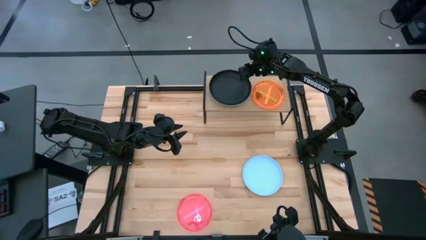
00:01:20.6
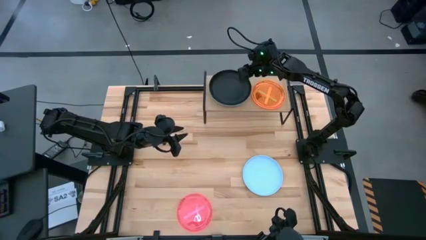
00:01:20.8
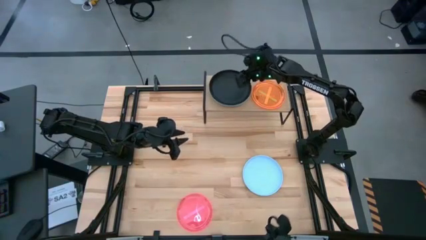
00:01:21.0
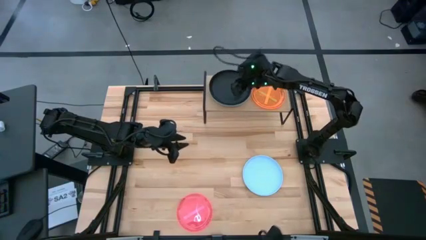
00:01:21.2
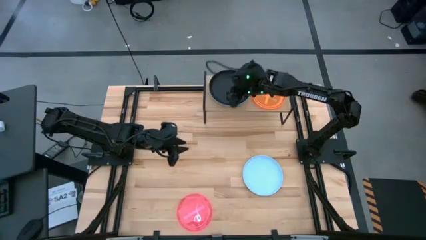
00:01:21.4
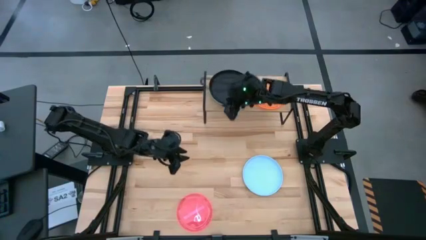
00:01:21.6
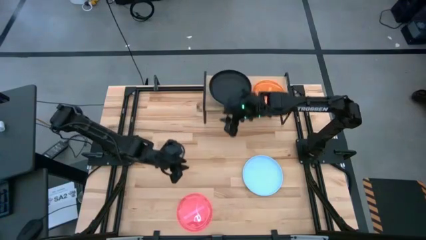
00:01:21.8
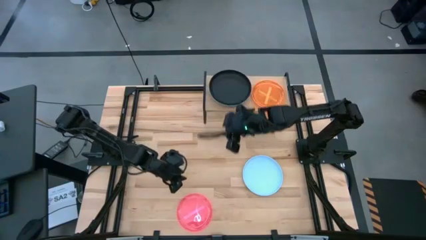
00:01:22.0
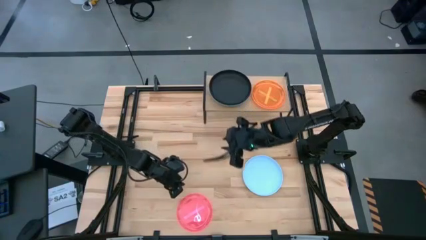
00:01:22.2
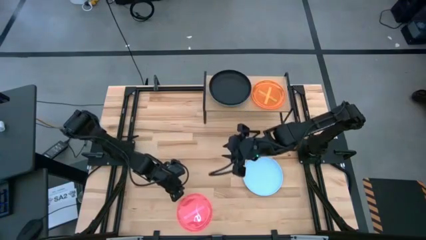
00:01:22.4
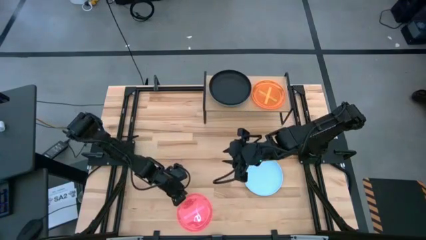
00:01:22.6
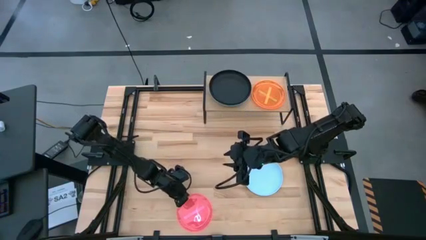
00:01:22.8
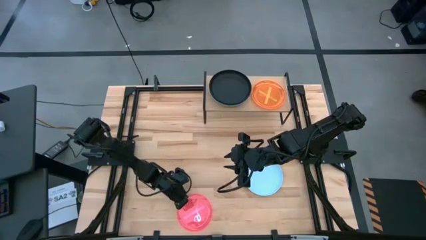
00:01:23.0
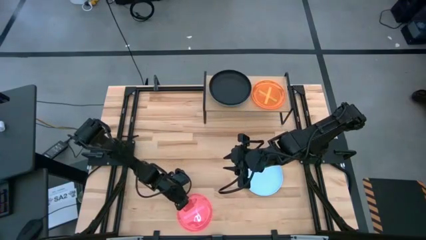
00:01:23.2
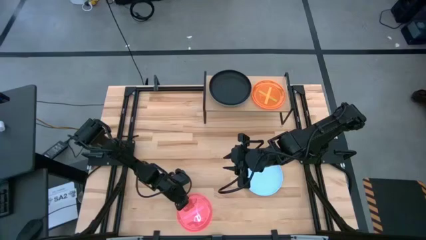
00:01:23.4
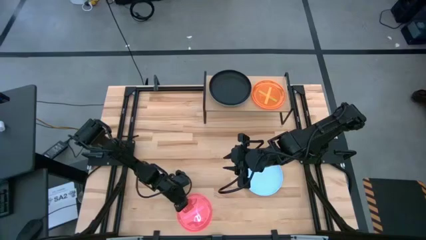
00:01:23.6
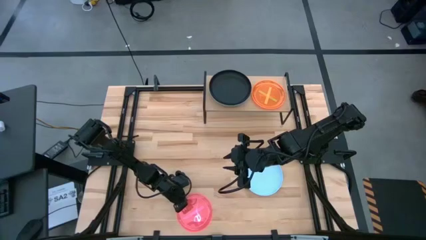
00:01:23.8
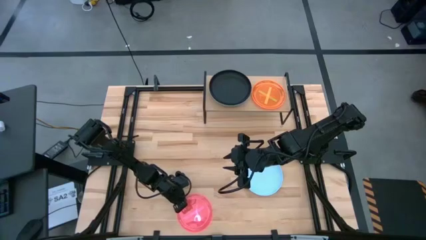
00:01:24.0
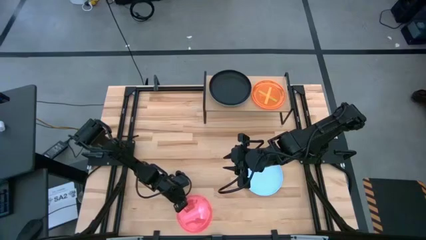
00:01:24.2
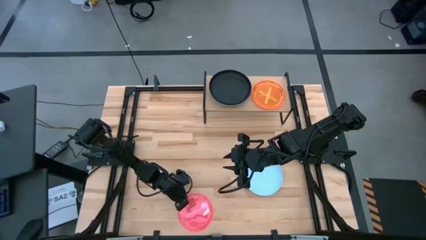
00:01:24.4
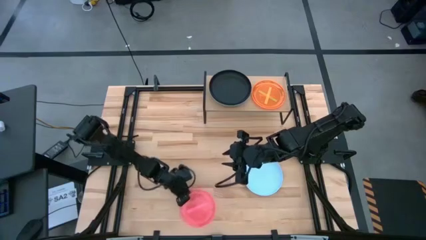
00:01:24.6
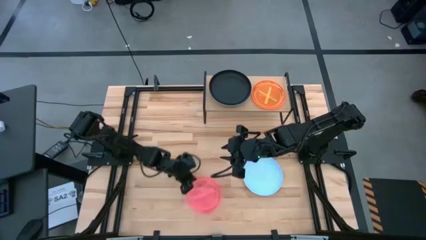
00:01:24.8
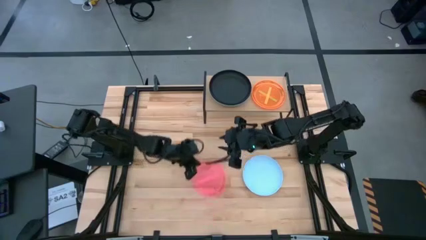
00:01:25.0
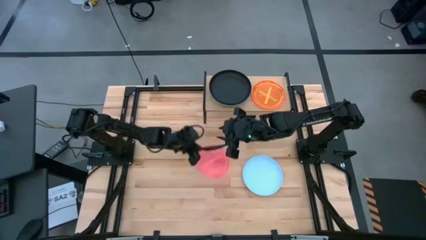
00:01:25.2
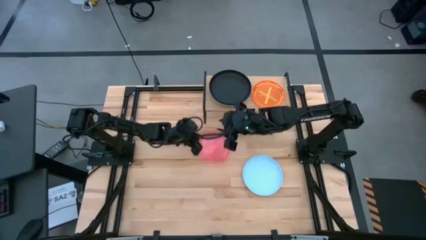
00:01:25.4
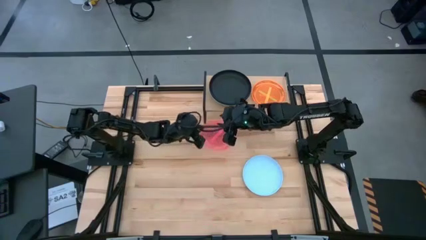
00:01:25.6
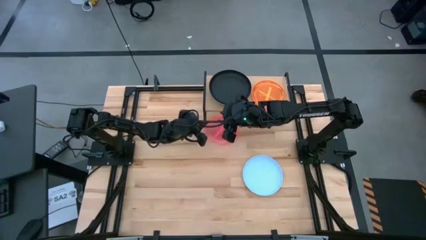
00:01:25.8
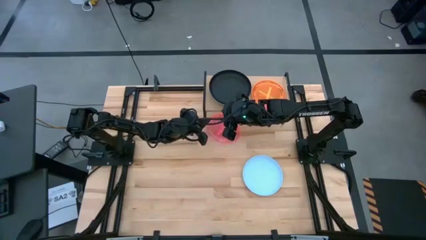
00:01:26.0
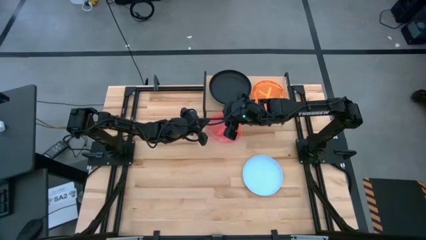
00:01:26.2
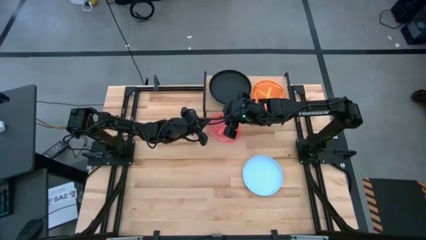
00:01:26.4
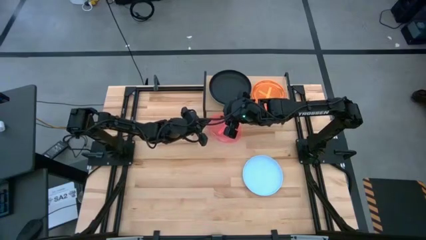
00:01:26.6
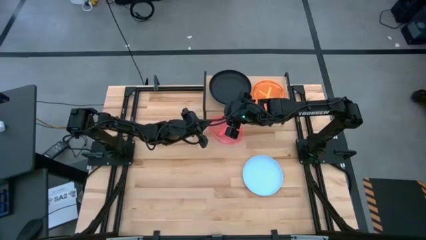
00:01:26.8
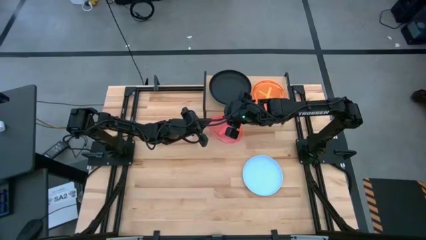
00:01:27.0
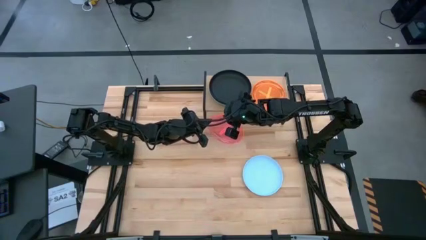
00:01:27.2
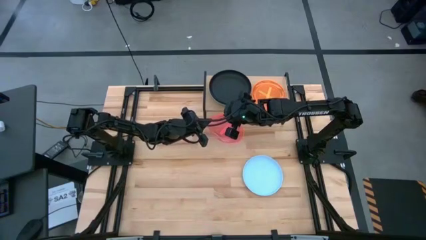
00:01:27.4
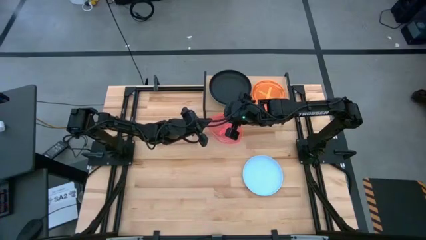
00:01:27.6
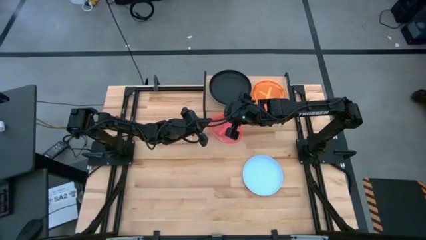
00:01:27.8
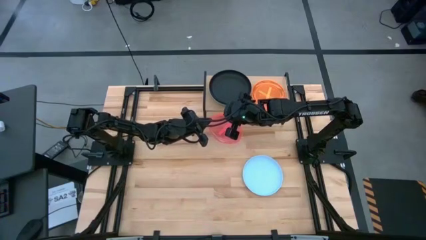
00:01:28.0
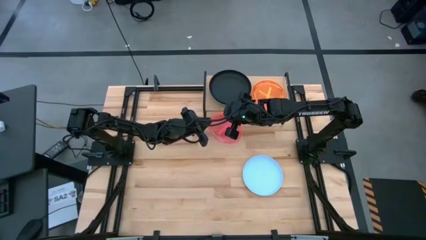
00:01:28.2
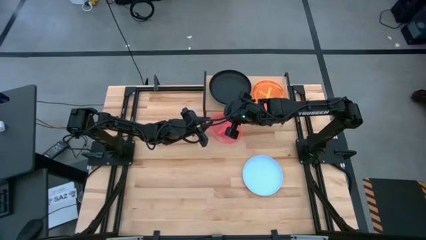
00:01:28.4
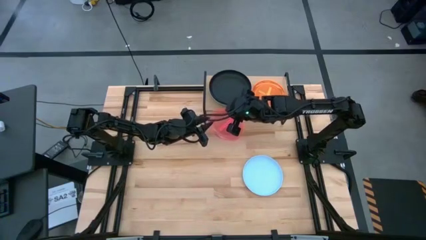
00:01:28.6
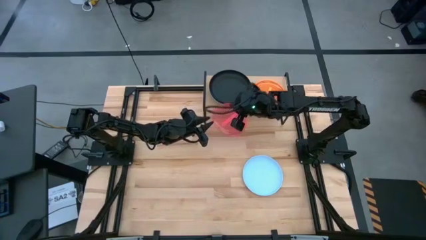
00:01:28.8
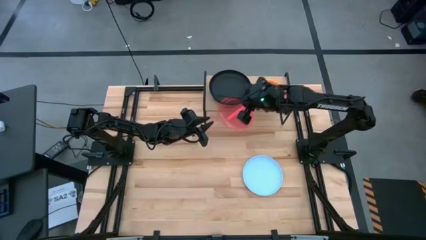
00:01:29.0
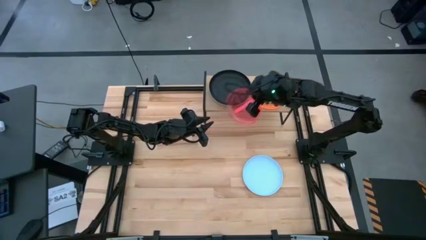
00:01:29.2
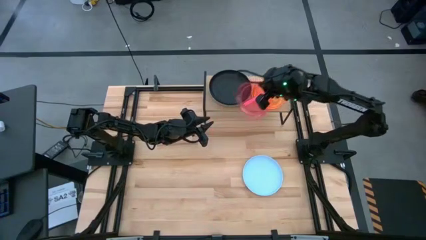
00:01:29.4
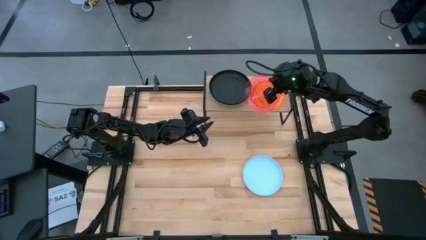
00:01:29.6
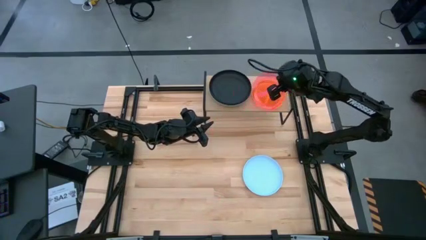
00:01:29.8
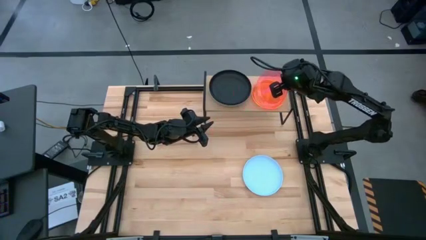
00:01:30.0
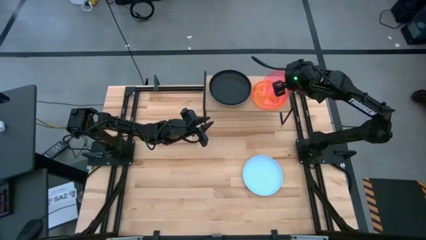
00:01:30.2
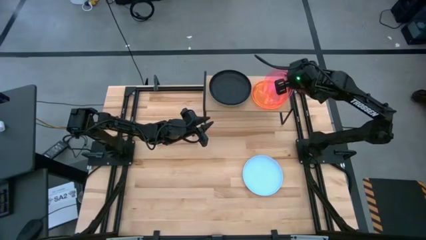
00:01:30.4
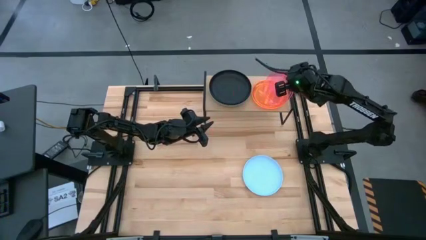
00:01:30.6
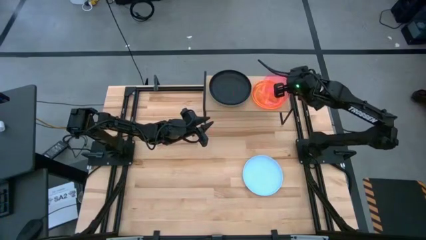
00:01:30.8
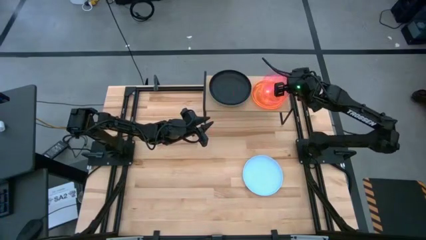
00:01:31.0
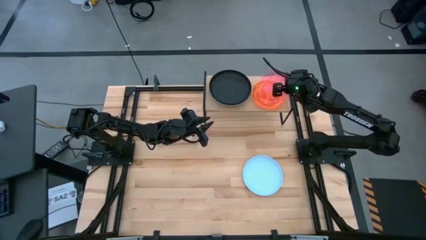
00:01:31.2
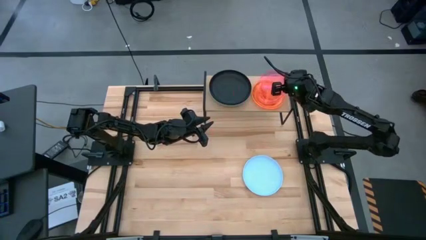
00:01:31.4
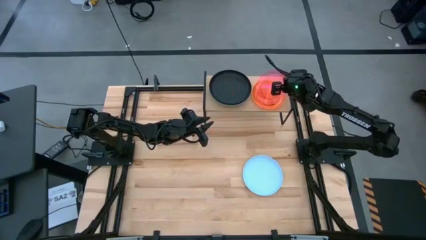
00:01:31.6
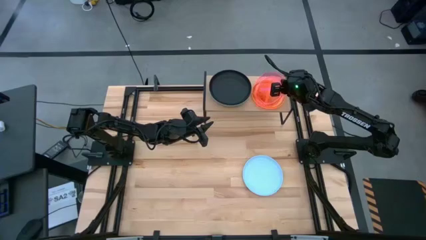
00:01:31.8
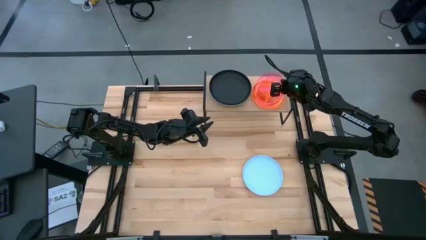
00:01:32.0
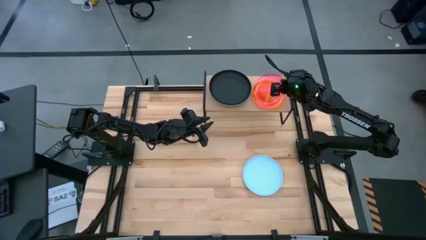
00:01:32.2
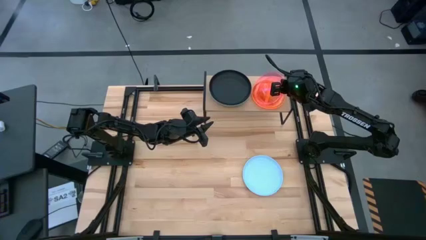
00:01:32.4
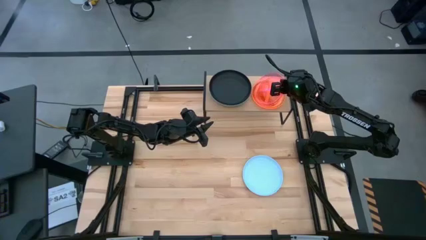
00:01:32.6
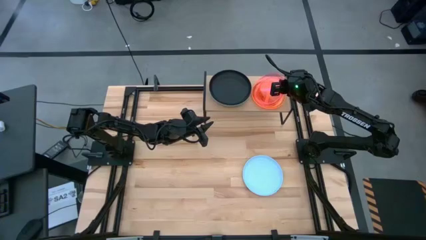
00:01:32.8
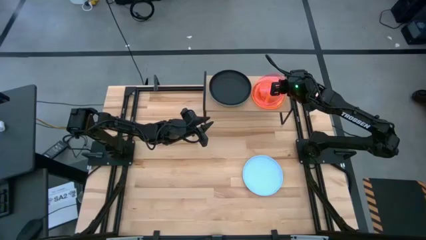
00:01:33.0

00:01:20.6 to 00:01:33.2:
Task: Place and stack plates onto a shelf
Stack the pink plate on top of the orange plate on the shelf
